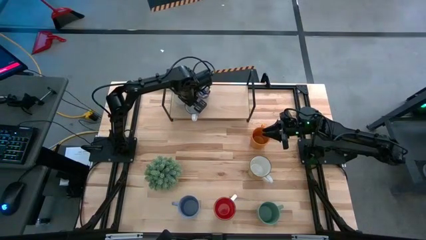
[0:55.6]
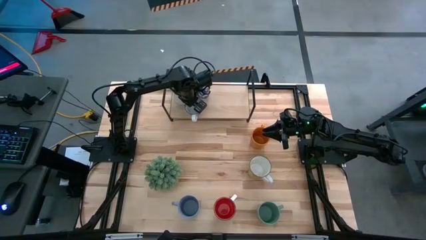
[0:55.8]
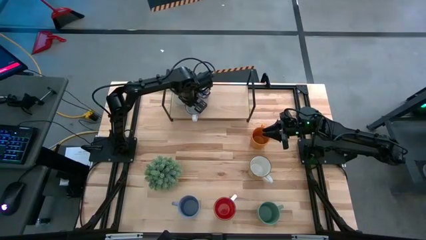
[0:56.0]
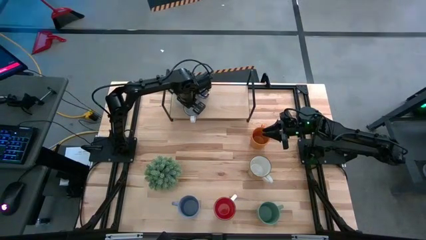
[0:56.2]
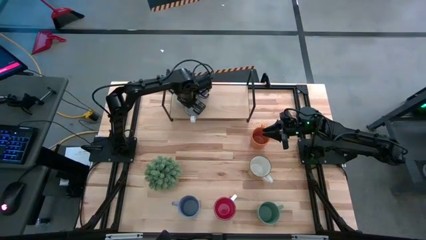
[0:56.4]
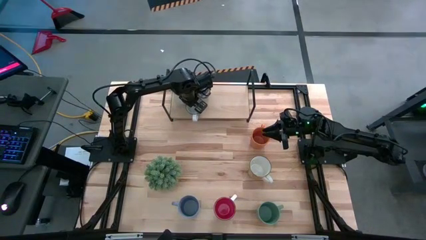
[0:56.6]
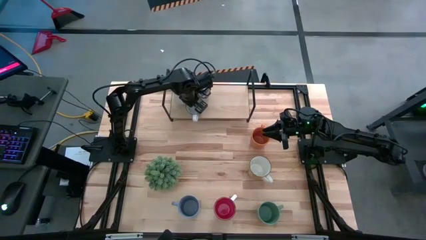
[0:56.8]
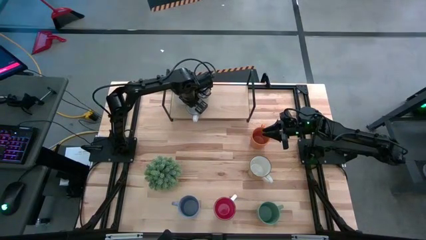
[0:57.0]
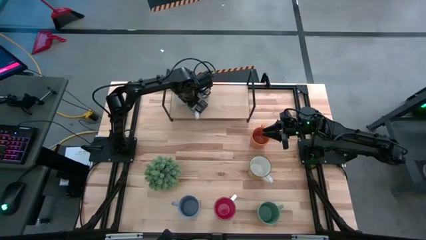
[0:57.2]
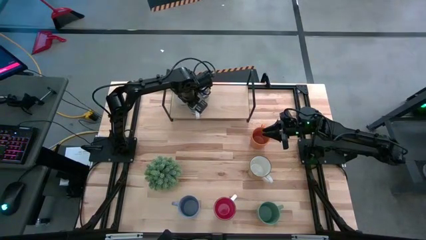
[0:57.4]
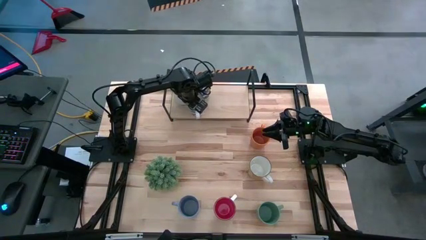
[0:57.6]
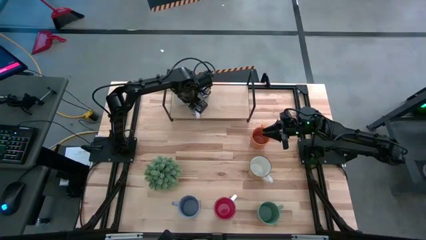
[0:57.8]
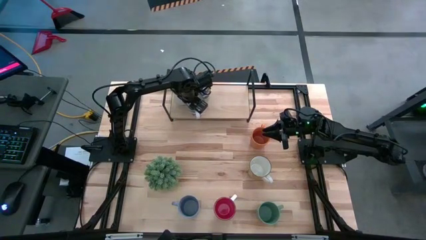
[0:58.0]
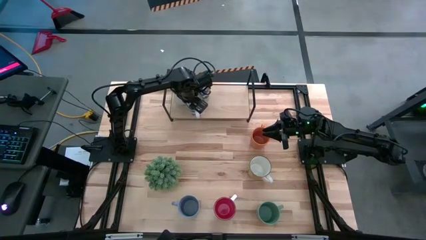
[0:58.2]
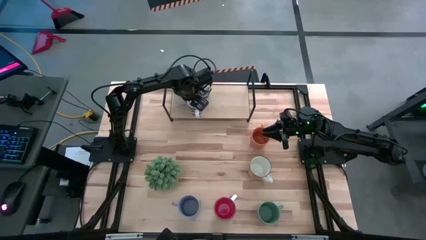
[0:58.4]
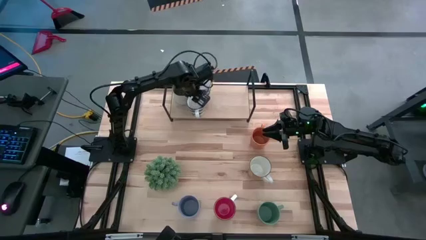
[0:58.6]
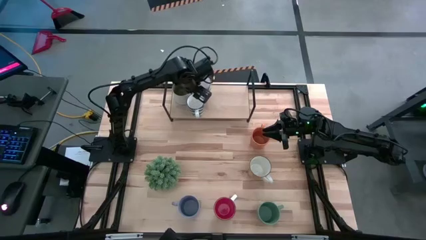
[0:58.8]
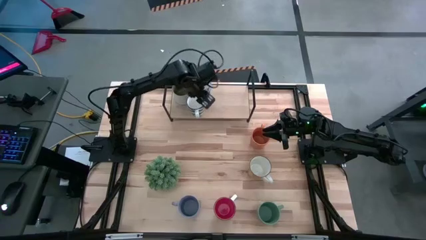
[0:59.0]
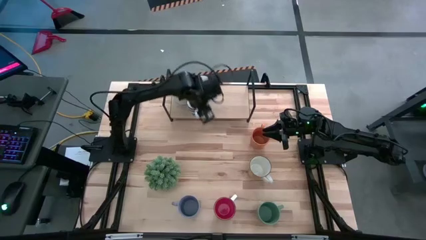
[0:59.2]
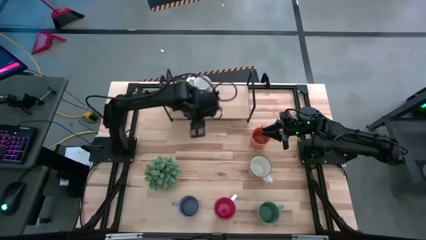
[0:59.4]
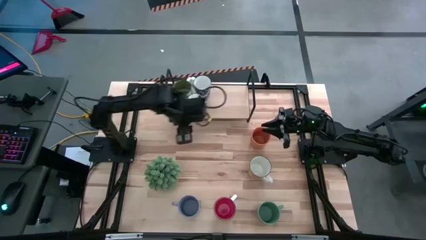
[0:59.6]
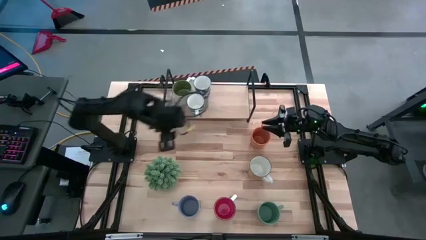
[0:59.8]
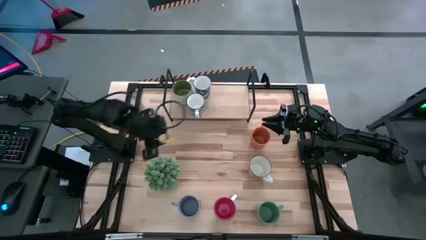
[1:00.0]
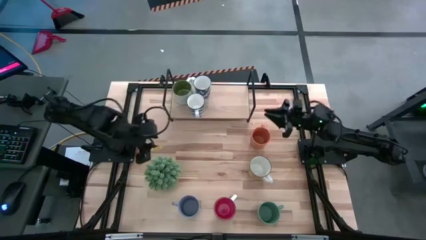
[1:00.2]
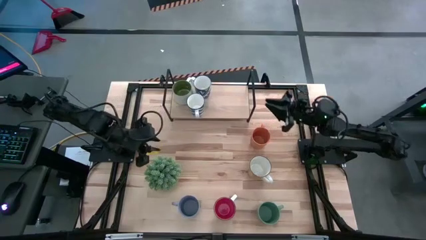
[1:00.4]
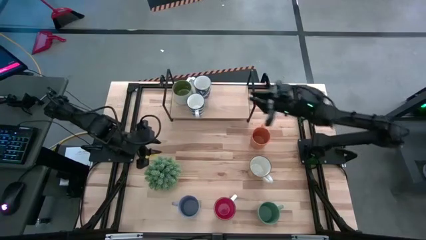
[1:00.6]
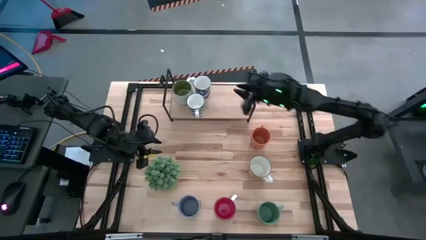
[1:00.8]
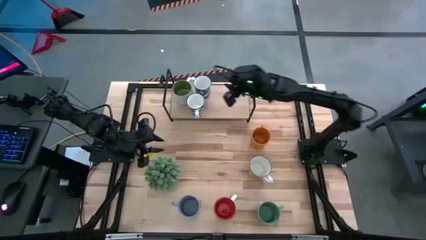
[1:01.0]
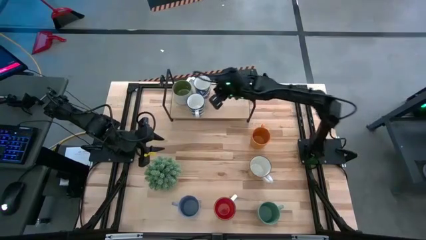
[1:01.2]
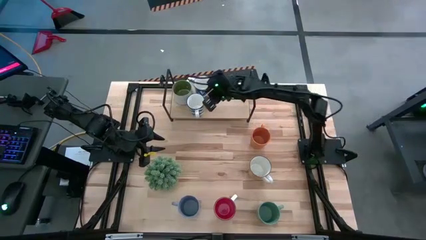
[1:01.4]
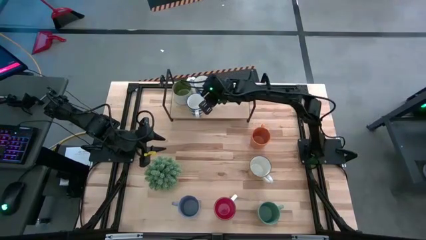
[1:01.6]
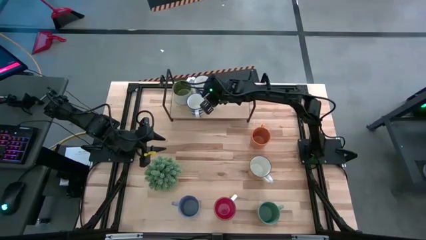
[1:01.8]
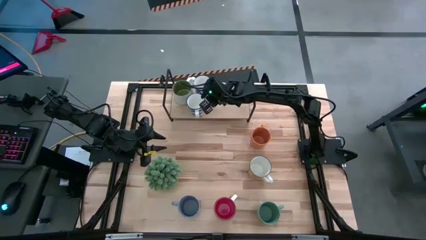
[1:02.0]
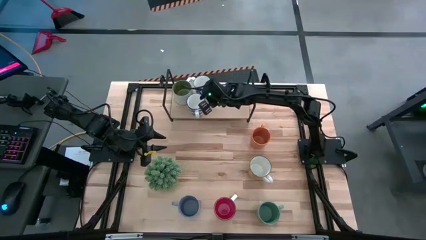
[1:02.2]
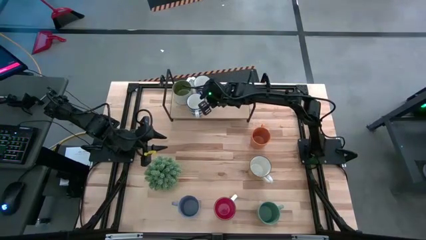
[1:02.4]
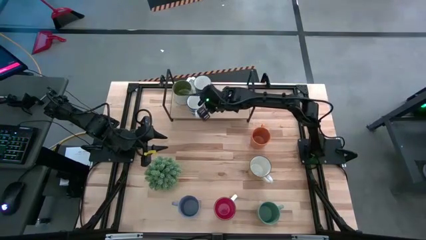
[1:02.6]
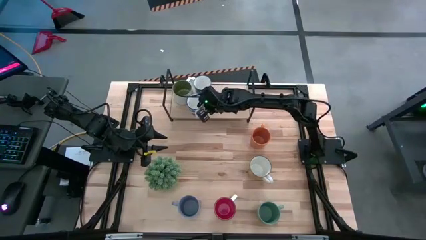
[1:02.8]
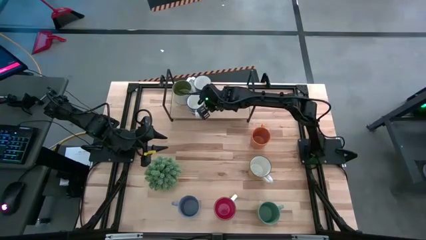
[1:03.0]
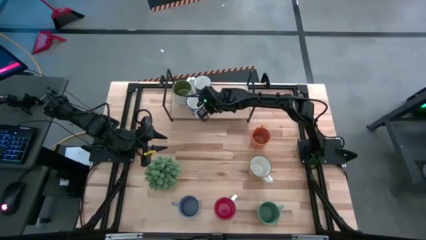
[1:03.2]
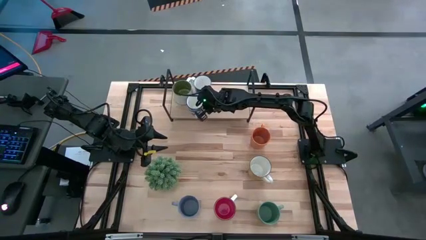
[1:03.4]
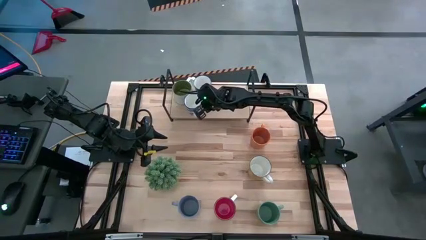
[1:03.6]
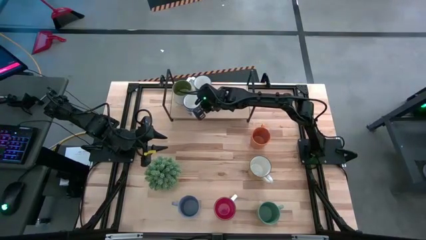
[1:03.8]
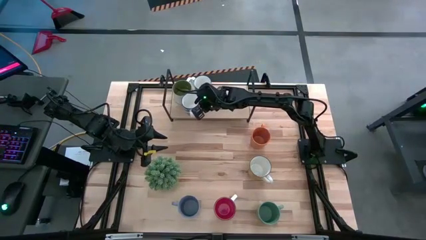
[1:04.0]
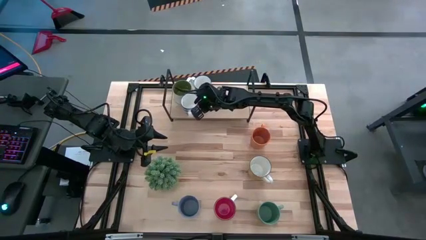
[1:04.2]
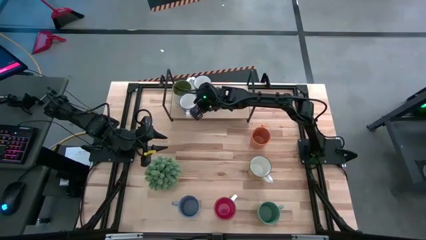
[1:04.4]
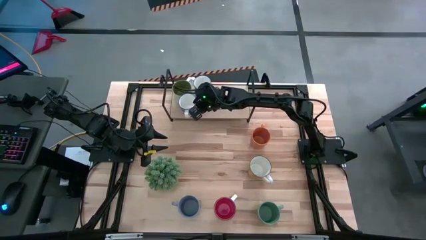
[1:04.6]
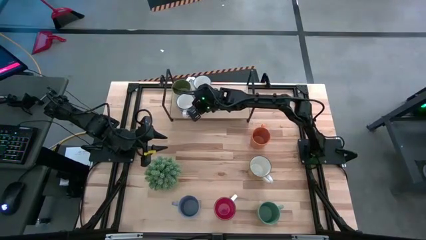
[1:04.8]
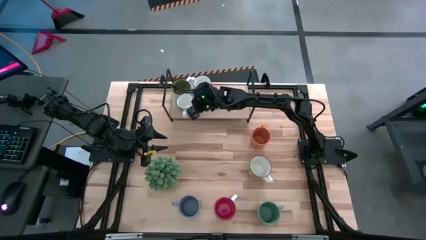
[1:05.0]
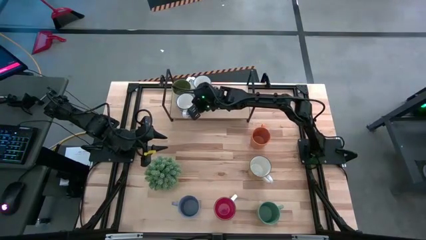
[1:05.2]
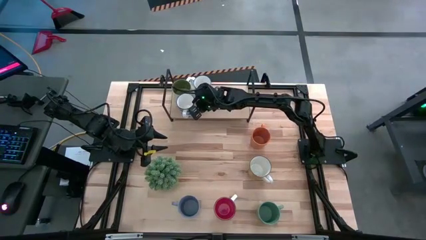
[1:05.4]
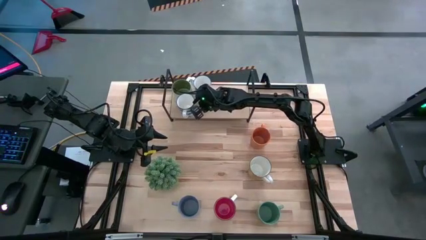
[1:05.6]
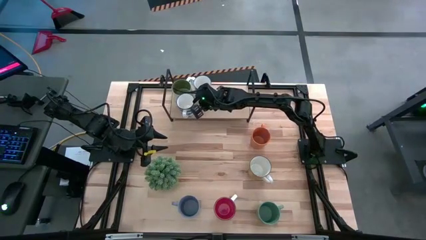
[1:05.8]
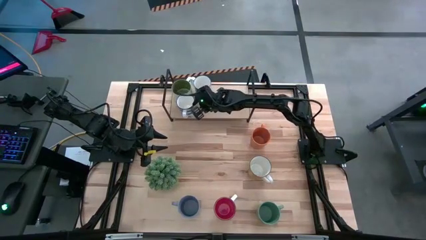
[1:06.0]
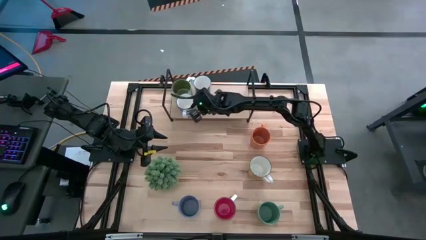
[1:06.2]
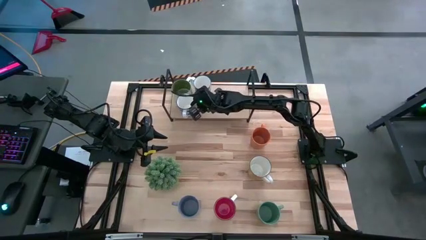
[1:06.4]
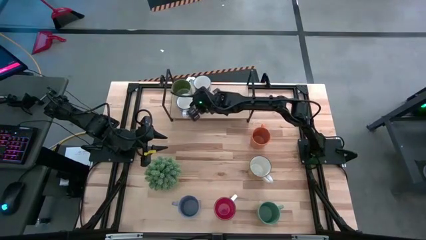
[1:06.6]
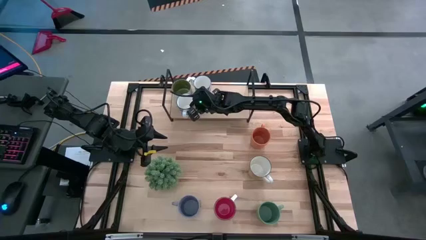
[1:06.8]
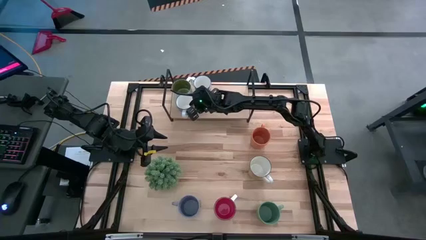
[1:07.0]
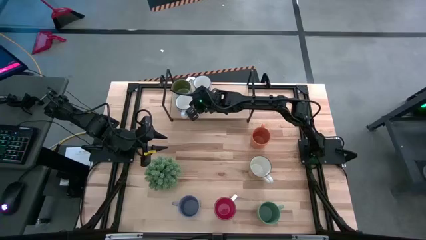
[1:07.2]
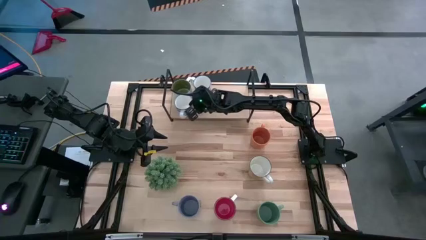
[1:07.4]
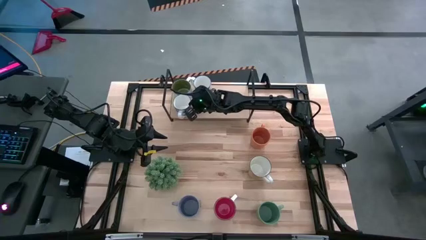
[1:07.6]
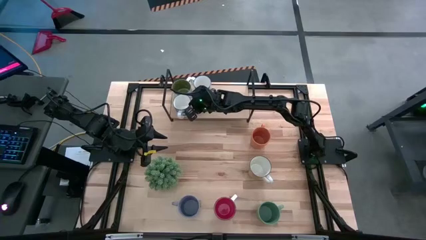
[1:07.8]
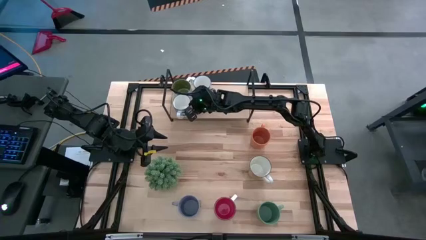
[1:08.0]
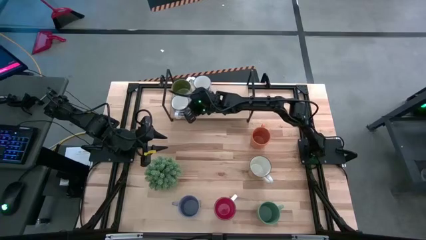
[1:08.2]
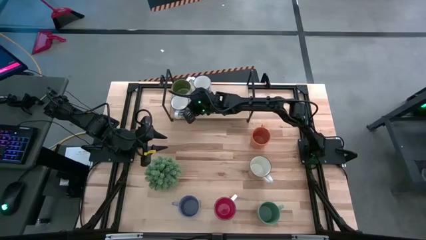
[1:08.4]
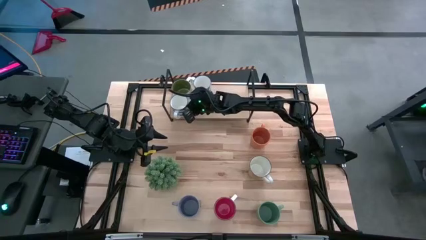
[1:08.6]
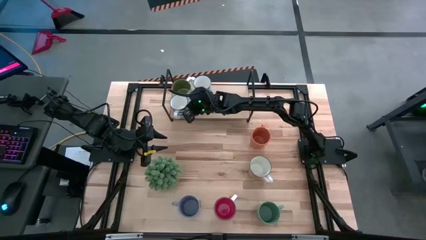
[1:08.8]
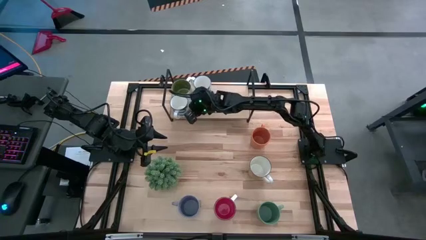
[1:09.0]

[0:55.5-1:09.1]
Task: Place coffee mugs
Put the blue mug on the shelf aligned with the other white mug
